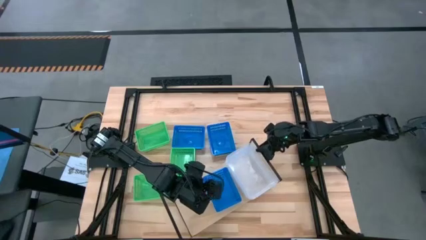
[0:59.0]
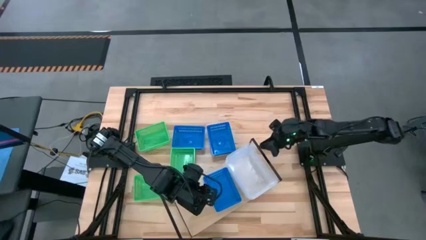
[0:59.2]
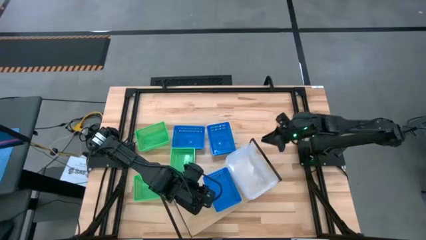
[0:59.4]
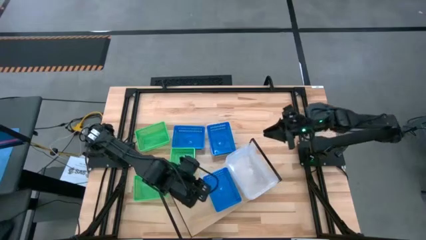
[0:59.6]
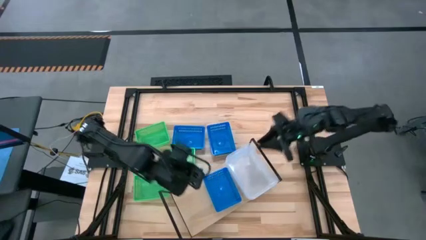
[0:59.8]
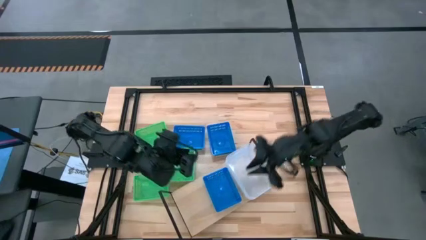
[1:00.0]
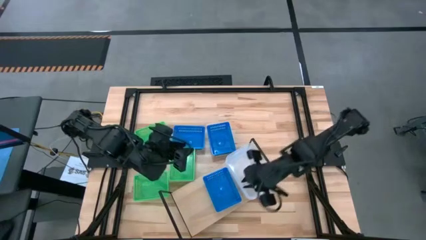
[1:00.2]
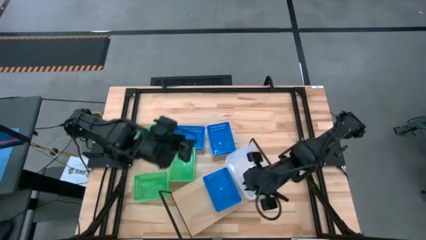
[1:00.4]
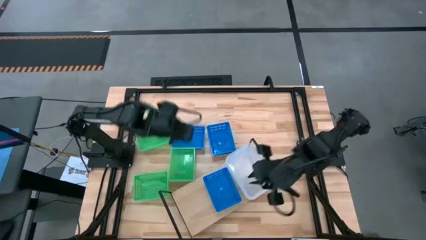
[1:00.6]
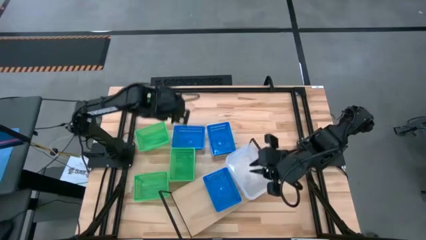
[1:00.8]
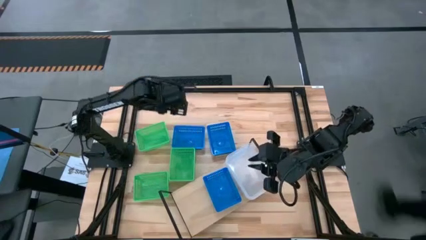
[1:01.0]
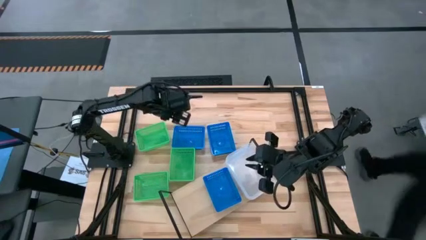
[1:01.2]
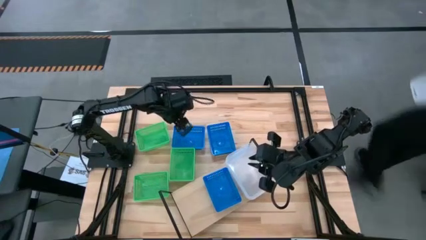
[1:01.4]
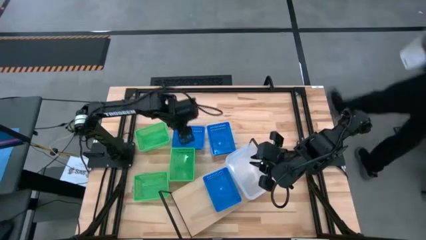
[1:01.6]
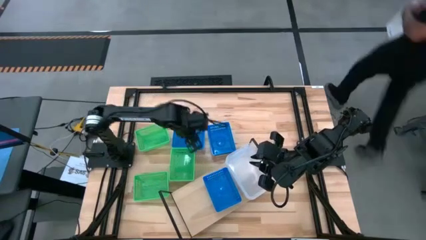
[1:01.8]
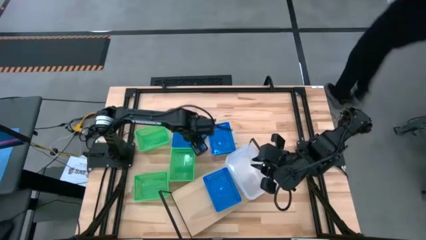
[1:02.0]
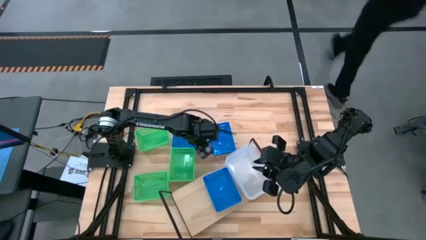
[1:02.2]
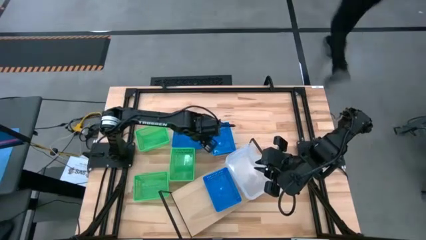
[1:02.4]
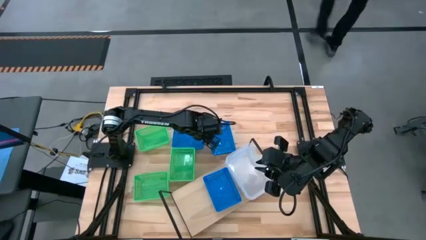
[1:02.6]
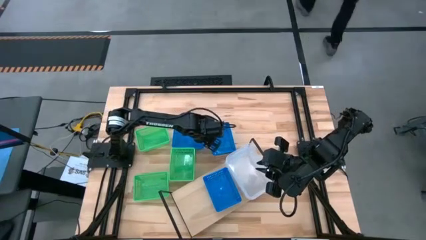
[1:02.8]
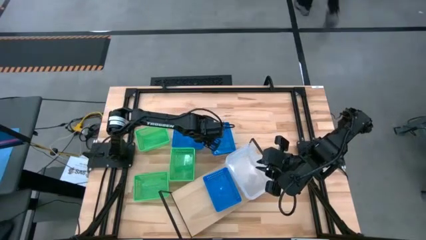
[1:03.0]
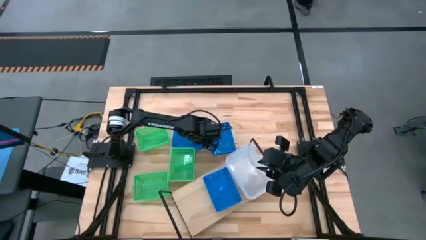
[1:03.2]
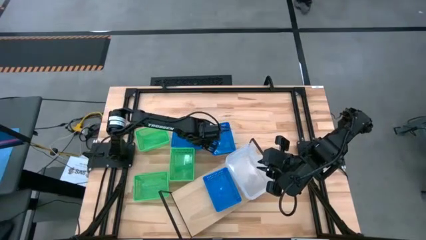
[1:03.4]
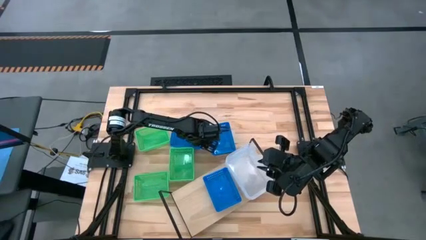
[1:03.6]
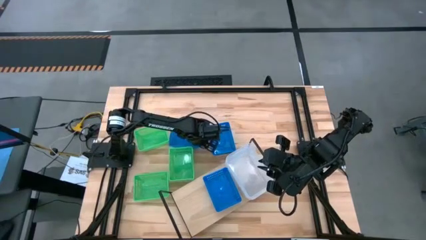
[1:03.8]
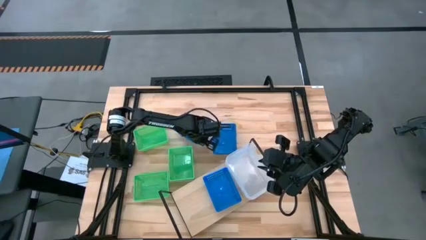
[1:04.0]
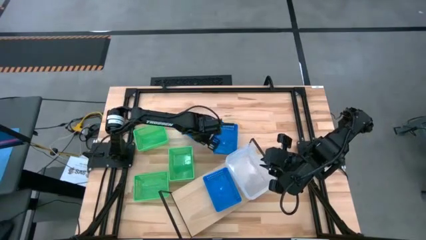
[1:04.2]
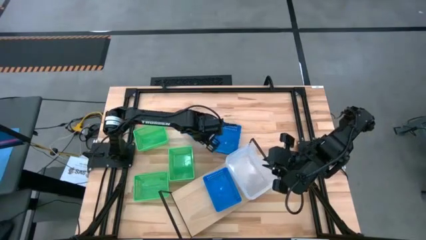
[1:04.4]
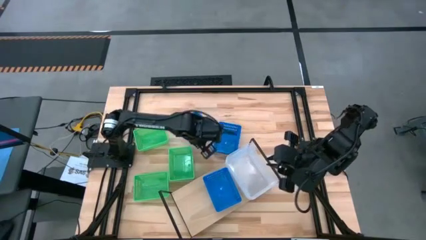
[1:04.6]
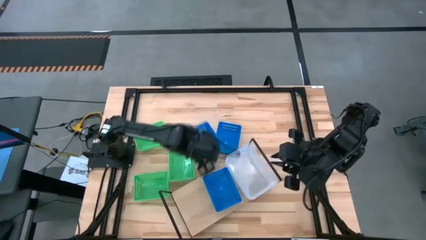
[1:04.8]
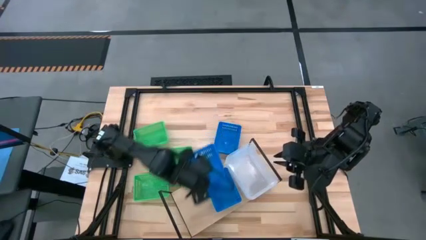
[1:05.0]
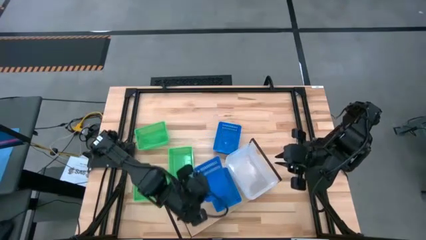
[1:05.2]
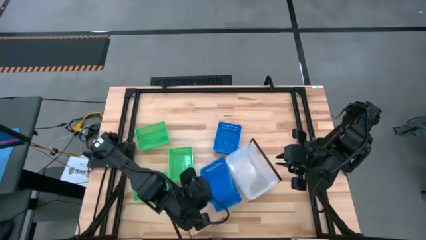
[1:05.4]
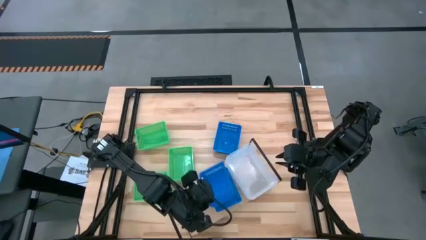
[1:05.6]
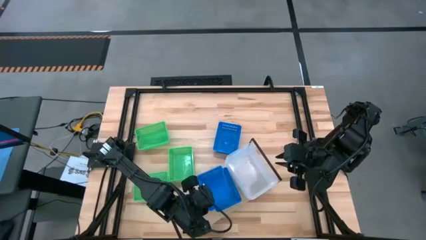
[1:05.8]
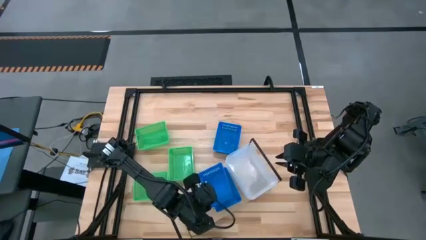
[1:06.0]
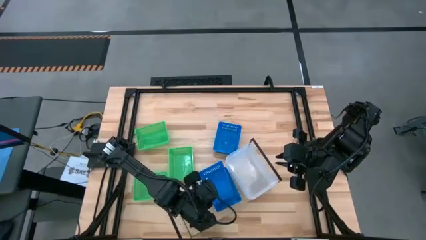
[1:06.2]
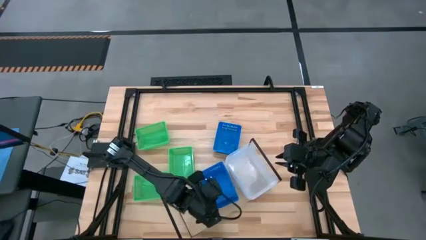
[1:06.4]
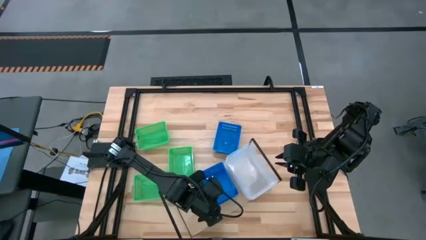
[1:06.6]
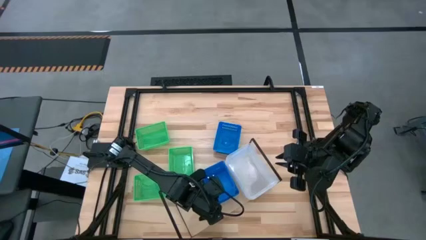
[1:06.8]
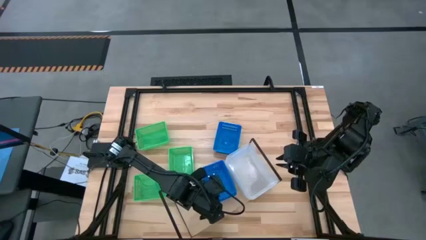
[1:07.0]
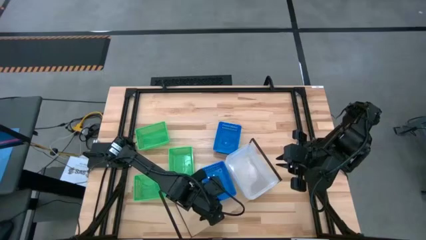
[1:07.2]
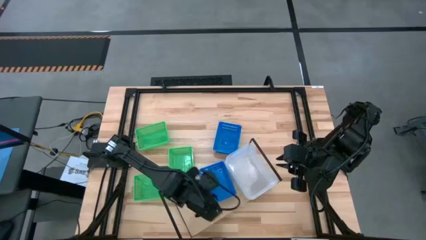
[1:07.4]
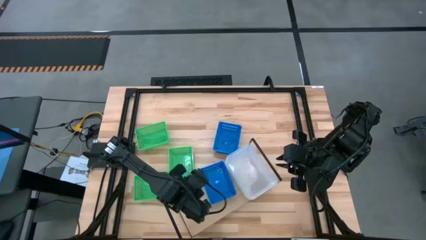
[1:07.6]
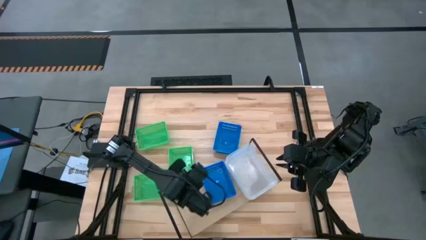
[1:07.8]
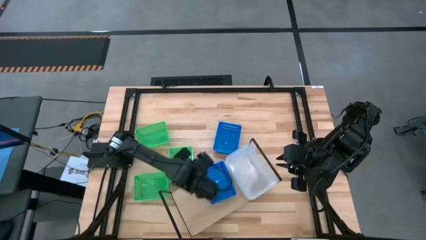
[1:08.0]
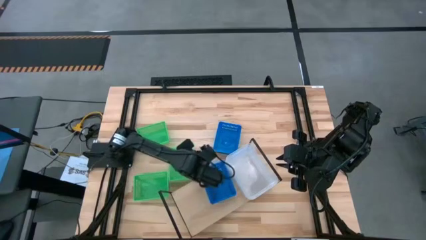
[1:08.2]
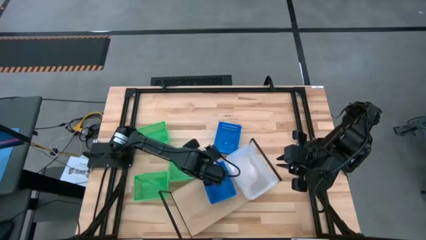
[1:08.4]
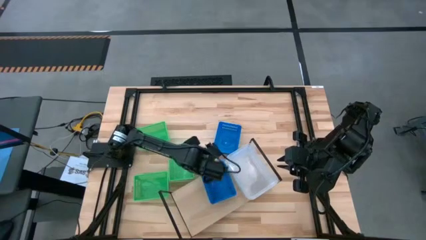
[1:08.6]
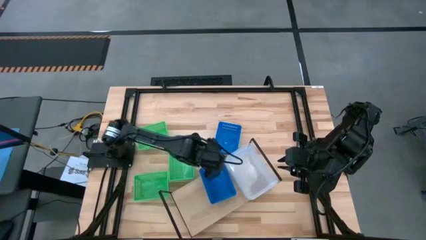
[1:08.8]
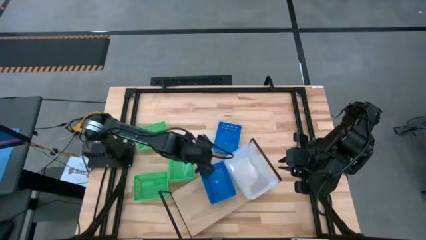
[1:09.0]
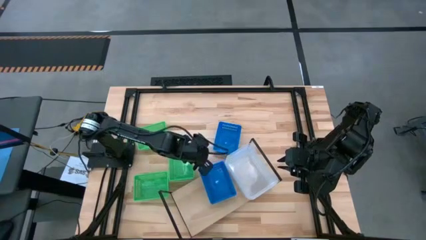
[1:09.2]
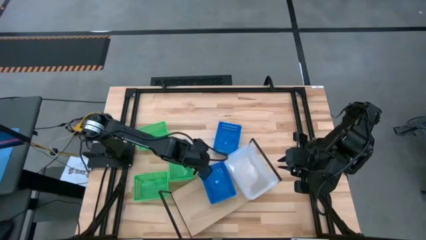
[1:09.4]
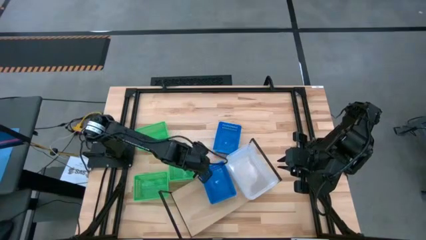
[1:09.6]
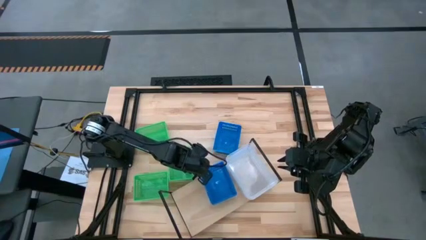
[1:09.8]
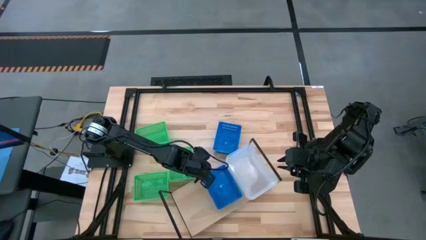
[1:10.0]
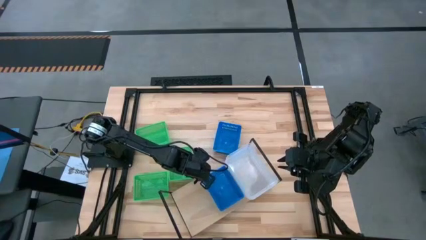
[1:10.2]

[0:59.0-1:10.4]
Task: Stack baskets on shelf by color
Stack the left blue basket on top of the other blue basket on the shelf

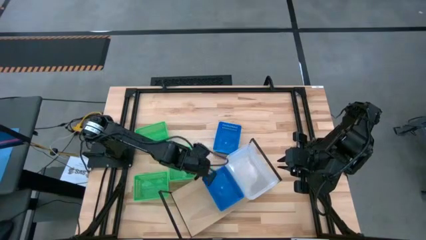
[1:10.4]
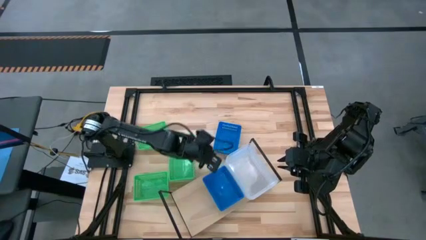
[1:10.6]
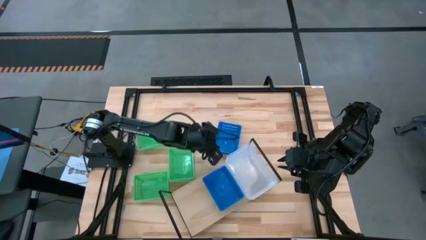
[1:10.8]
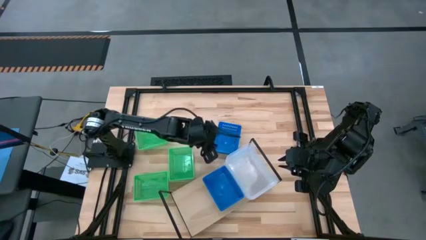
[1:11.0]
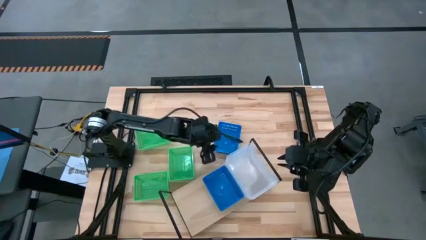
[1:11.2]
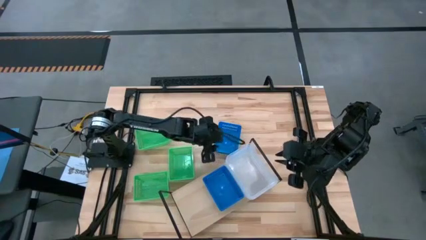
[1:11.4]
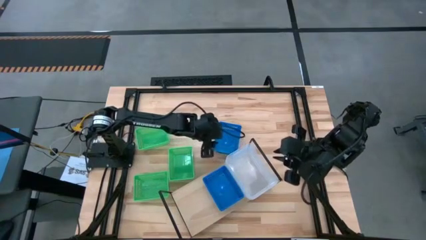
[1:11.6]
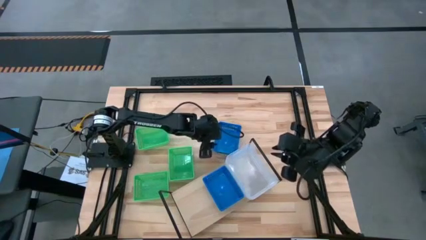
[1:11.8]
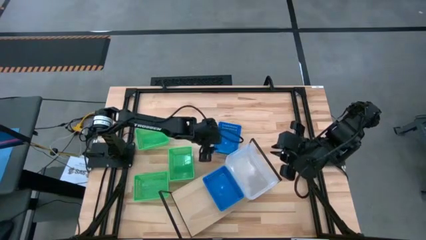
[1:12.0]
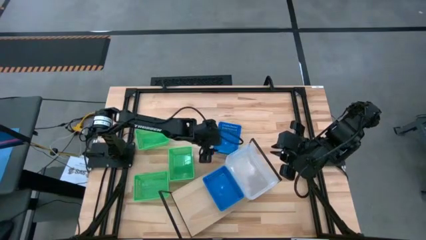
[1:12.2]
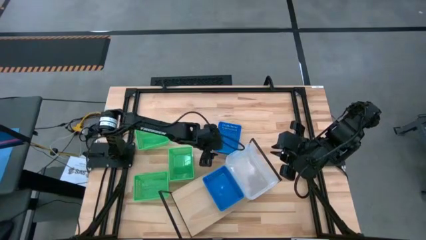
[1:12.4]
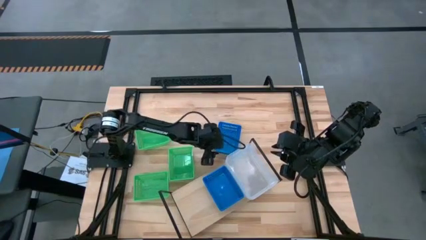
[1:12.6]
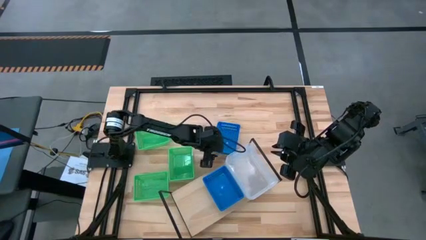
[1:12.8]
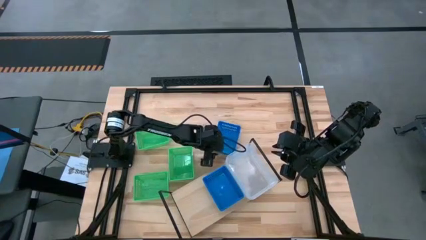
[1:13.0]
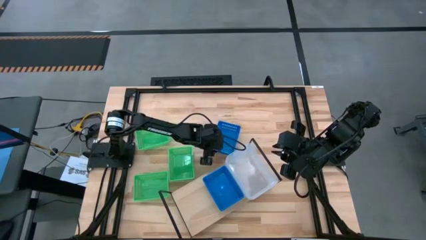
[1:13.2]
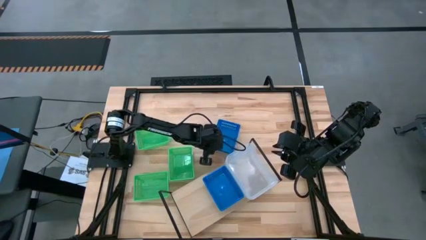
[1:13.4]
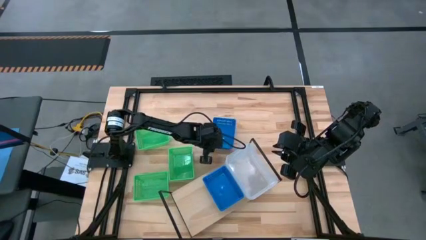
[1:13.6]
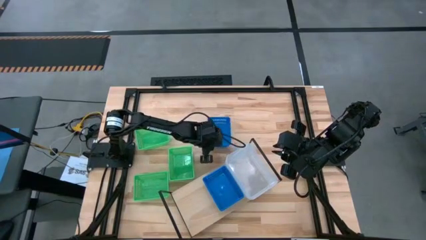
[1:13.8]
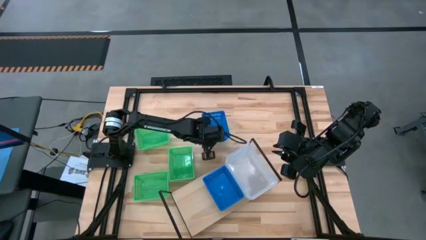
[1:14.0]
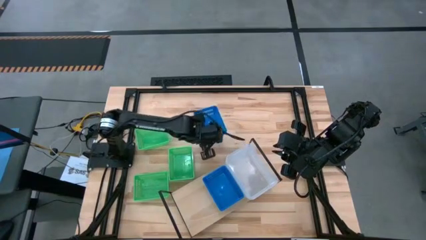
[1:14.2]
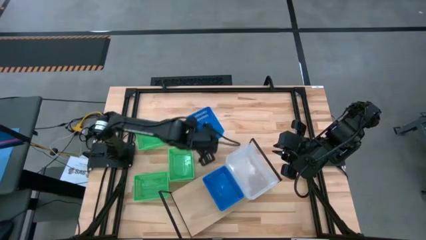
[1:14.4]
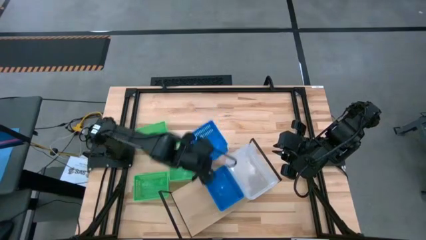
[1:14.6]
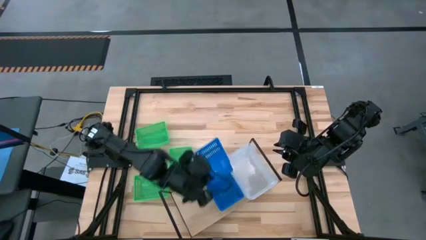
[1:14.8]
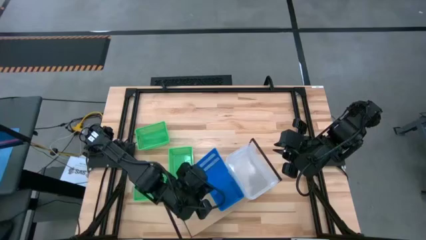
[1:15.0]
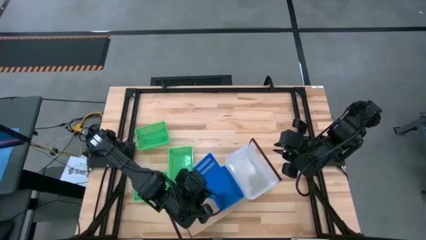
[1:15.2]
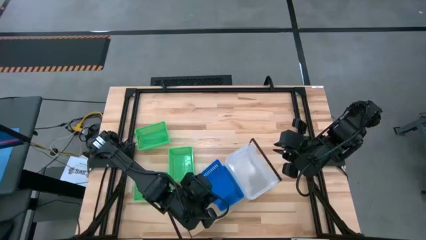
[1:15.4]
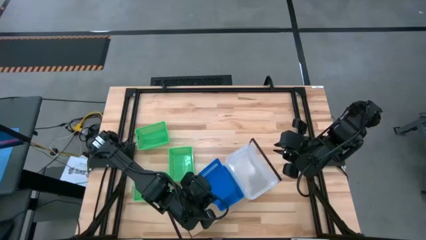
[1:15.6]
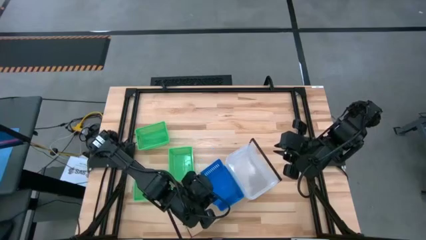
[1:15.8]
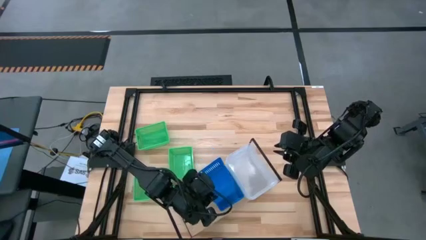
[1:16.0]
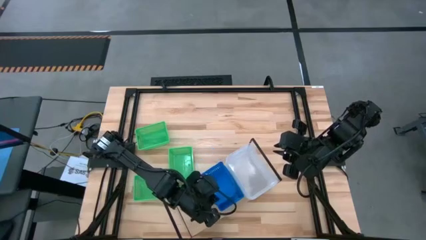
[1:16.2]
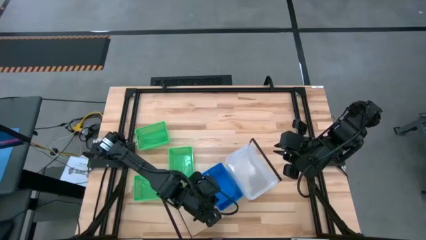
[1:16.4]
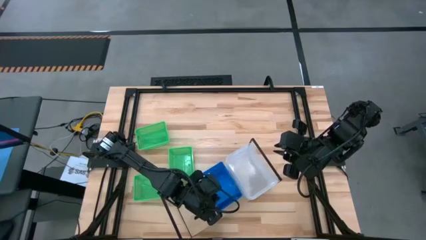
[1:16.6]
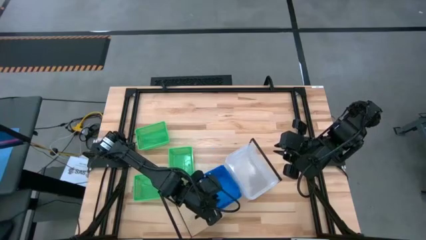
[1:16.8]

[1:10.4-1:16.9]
Stack the blue basket on top of the other blue baskets on the shelf
